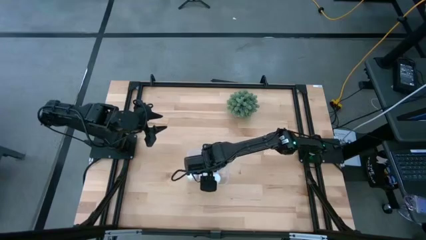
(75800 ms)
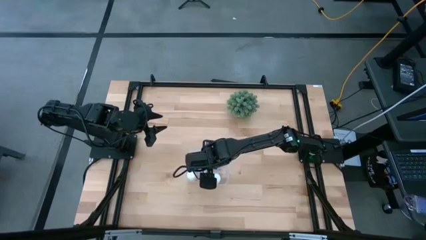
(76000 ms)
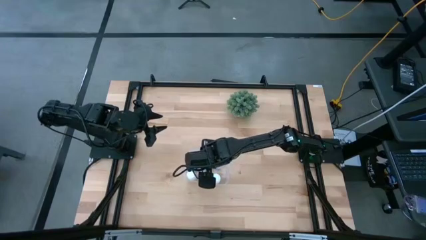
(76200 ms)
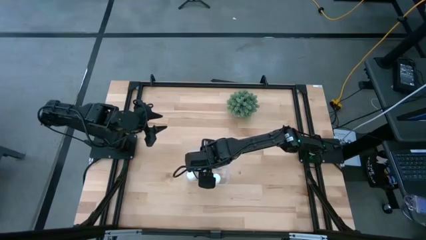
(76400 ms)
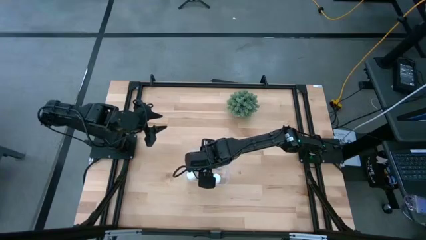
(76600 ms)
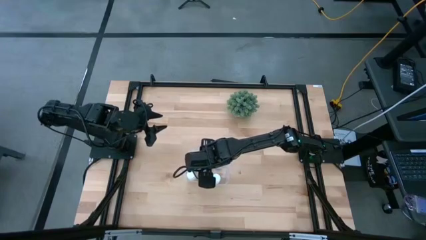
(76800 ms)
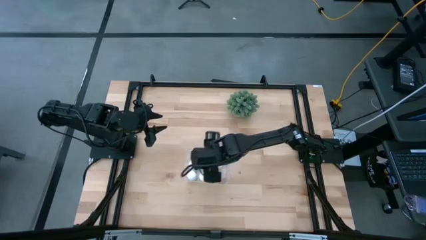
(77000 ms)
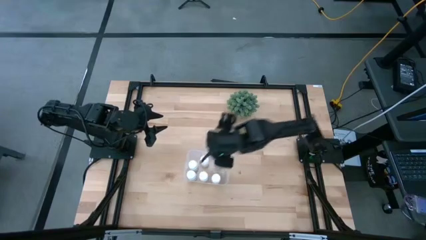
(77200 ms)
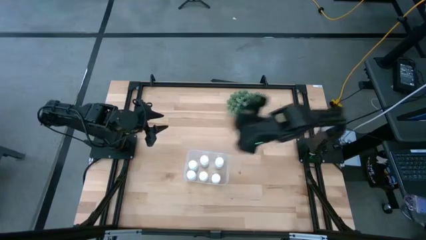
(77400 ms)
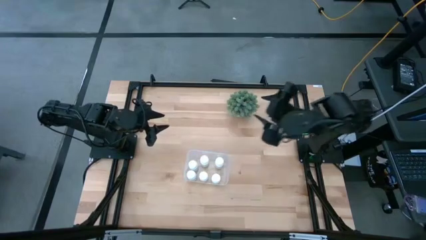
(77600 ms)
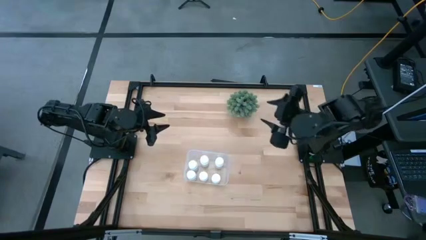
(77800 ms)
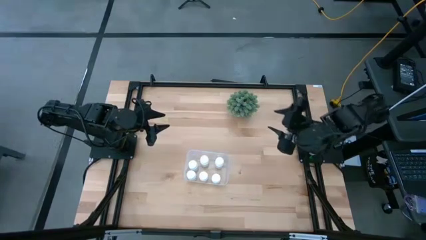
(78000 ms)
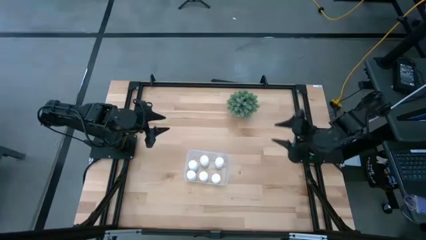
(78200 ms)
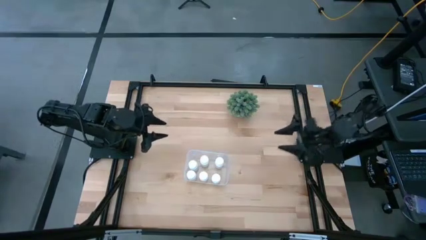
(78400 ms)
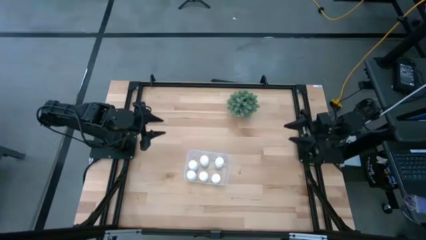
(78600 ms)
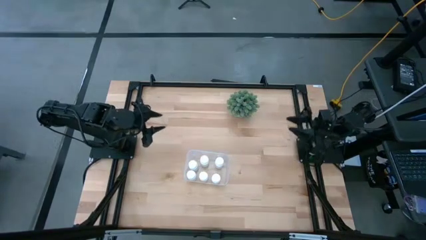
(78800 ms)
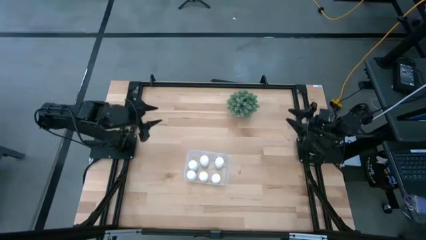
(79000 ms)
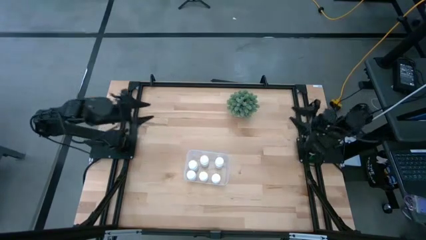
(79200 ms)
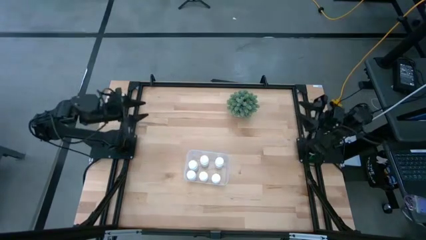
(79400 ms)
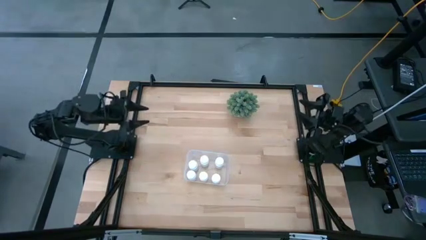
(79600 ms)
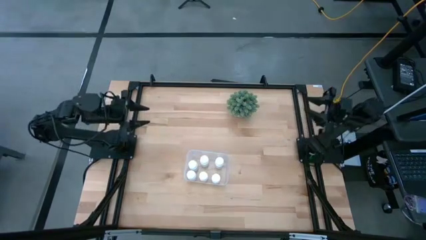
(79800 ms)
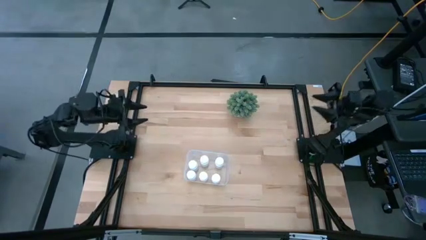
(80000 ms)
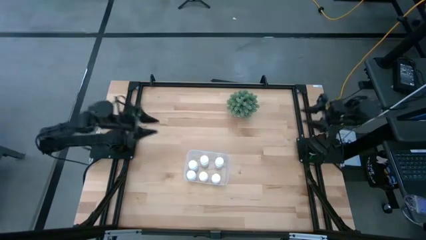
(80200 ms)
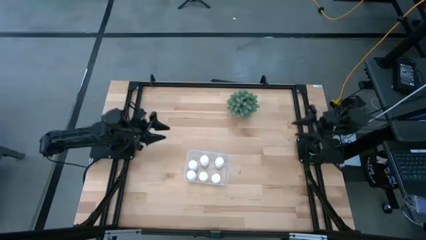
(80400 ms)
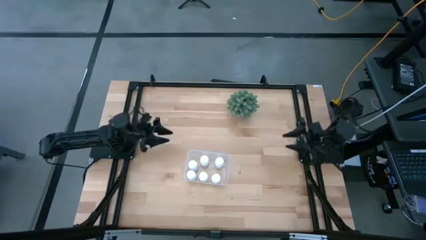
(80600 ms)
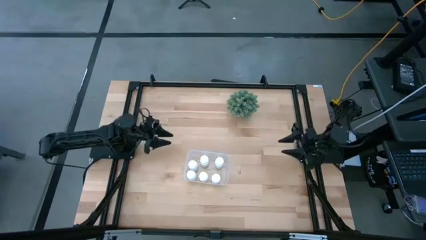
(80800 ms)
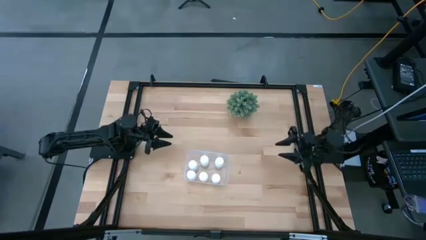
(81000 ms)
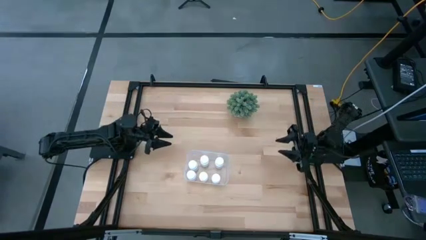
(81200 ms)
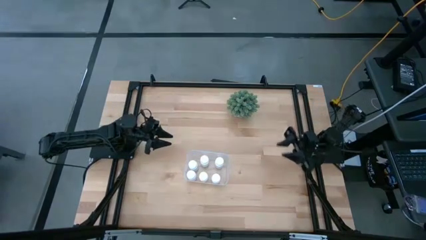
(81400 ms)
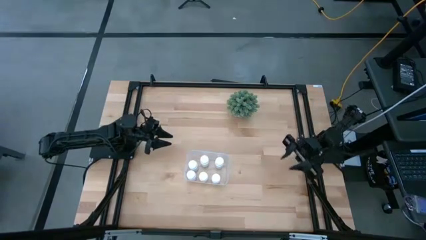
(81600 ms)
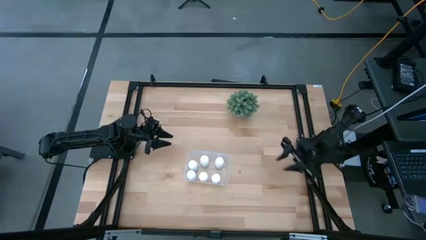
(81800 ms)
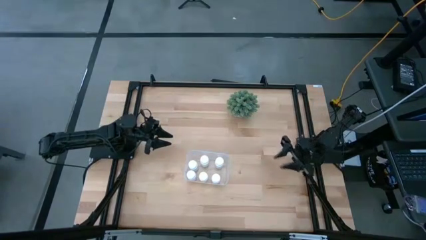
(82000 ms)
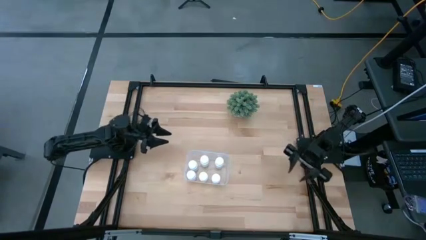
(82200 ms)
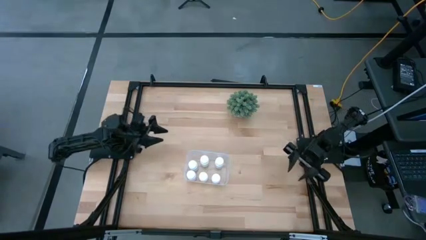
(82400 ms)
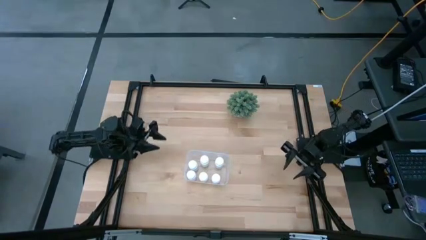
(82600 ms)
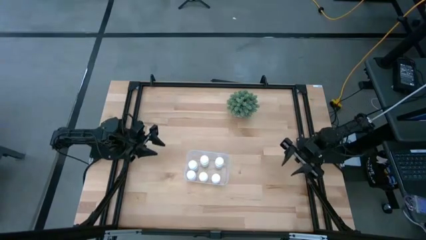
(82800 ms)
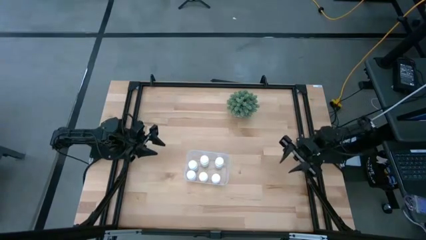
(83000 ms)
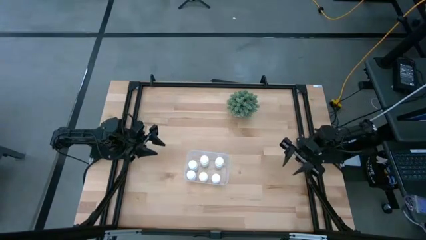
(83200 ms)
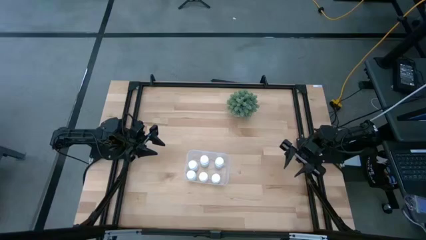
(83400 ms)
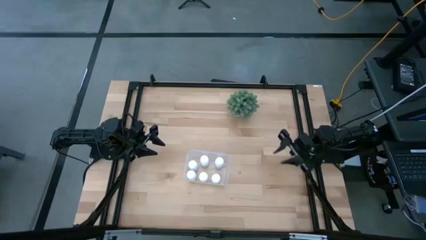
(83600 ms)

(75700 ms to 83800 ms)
Task: Pick and place pill bottles into a basket
Return to Home Position

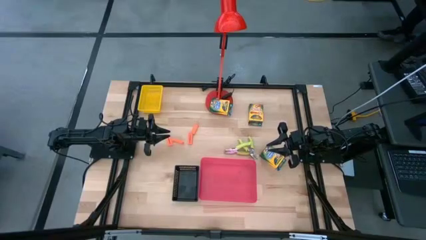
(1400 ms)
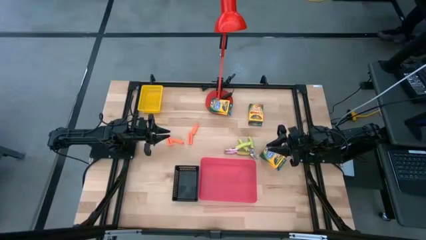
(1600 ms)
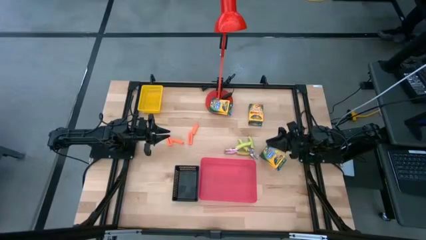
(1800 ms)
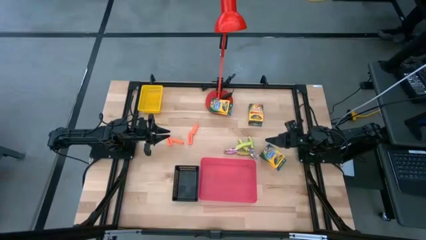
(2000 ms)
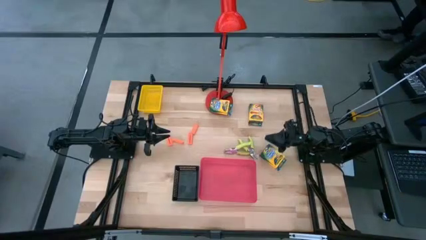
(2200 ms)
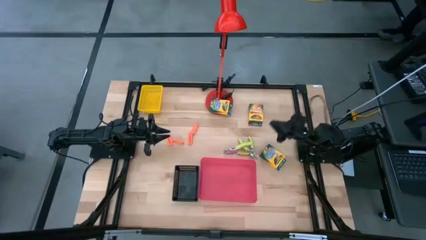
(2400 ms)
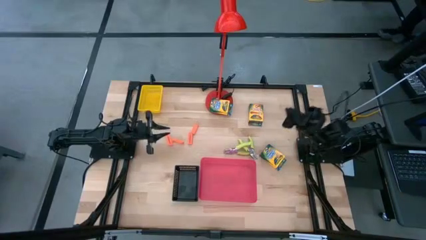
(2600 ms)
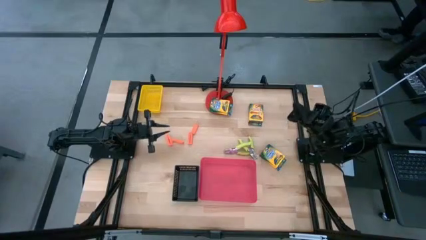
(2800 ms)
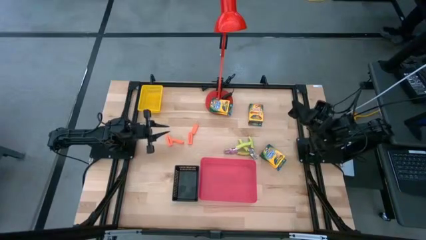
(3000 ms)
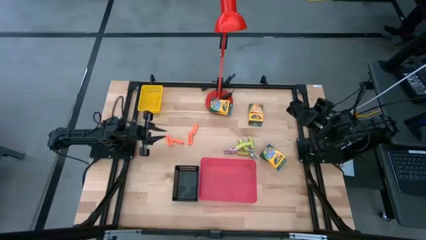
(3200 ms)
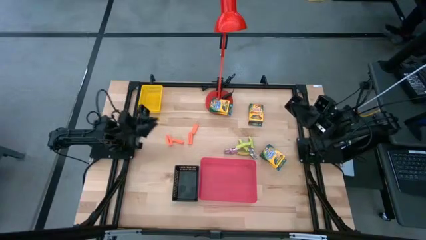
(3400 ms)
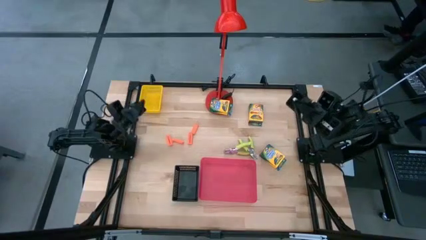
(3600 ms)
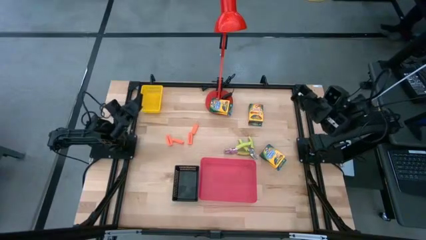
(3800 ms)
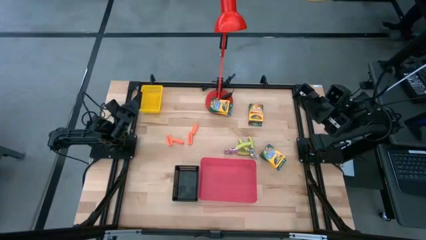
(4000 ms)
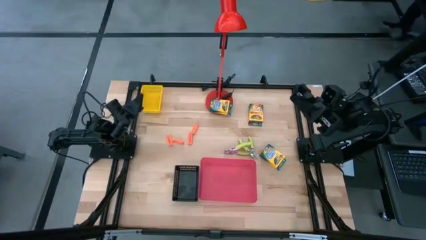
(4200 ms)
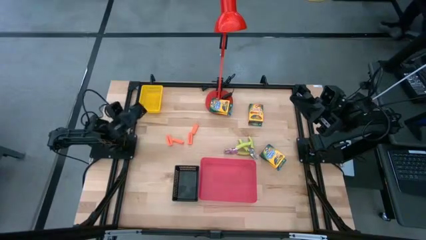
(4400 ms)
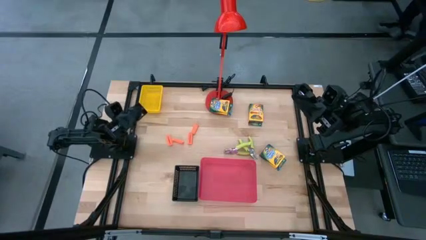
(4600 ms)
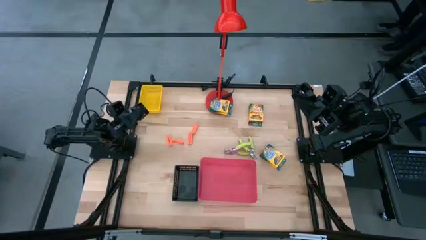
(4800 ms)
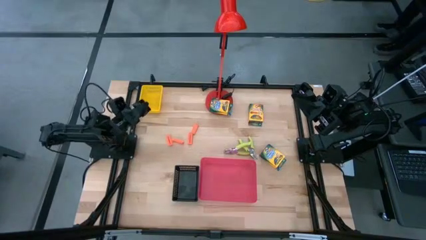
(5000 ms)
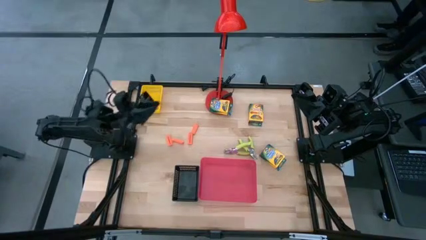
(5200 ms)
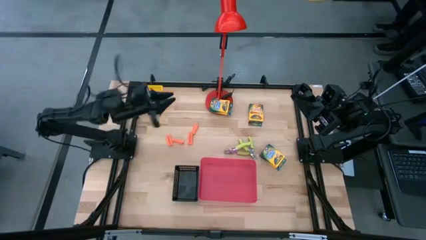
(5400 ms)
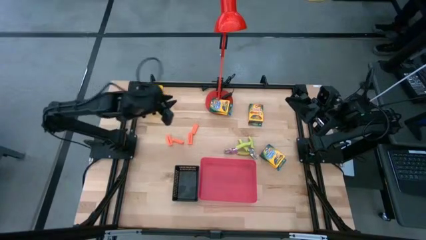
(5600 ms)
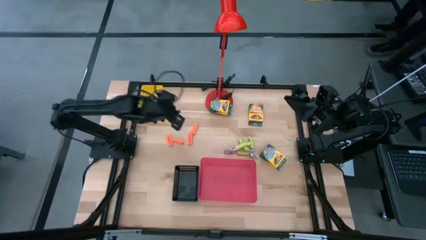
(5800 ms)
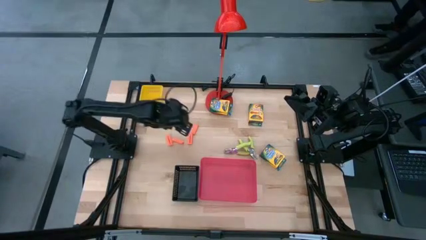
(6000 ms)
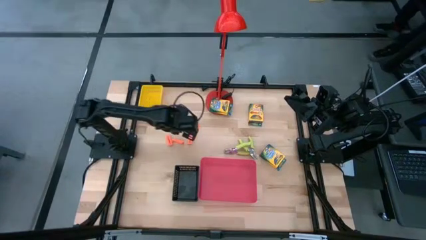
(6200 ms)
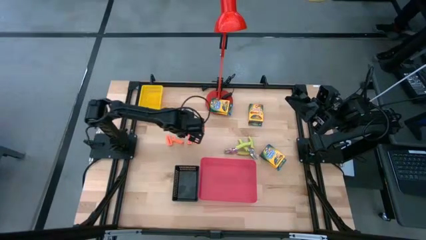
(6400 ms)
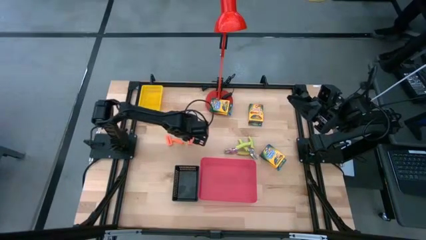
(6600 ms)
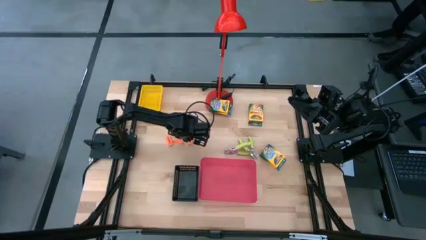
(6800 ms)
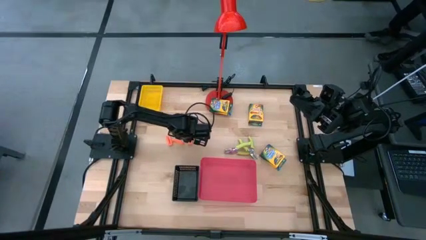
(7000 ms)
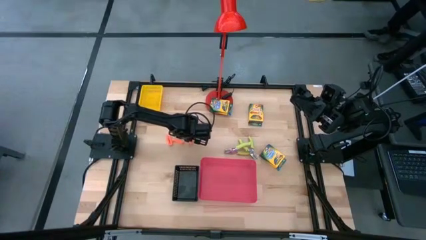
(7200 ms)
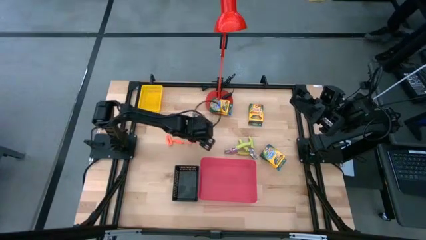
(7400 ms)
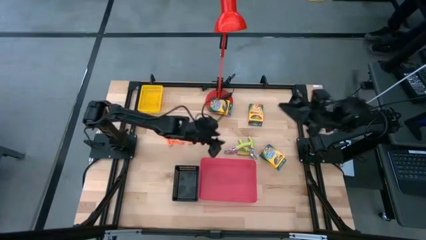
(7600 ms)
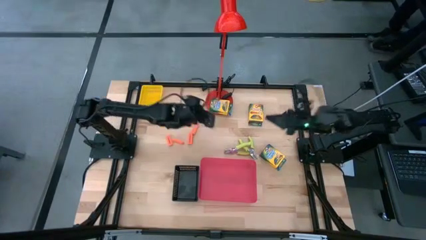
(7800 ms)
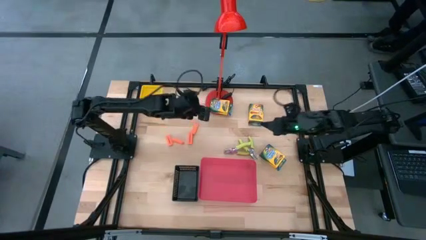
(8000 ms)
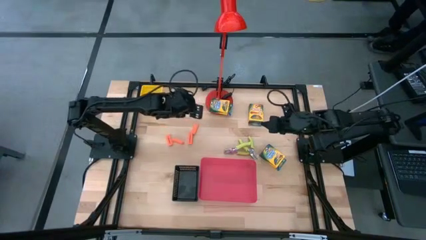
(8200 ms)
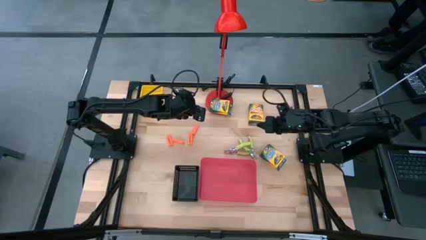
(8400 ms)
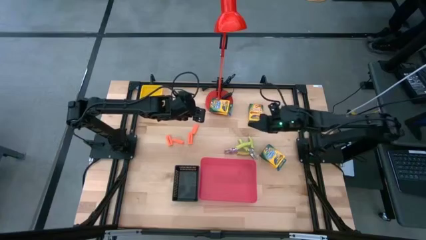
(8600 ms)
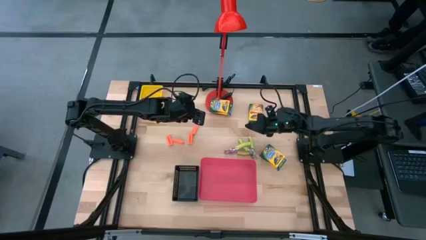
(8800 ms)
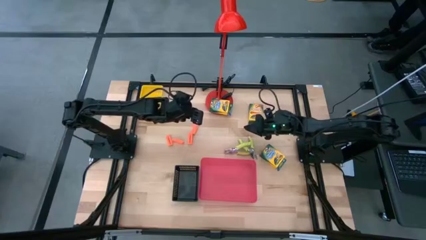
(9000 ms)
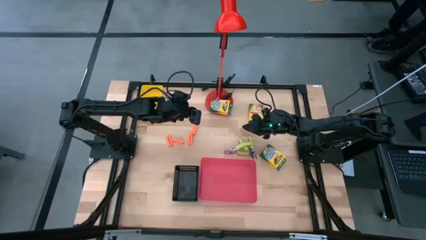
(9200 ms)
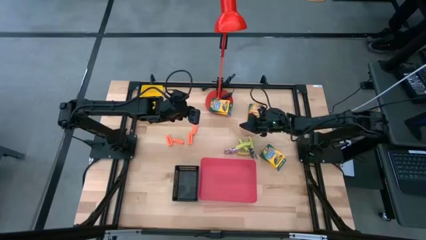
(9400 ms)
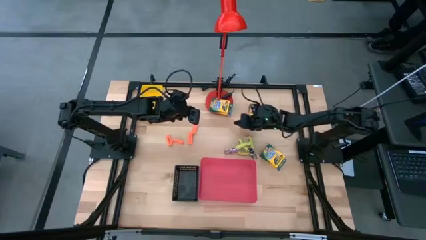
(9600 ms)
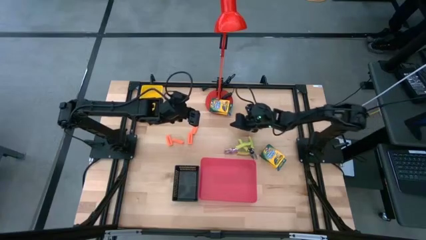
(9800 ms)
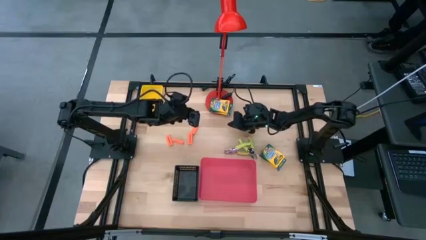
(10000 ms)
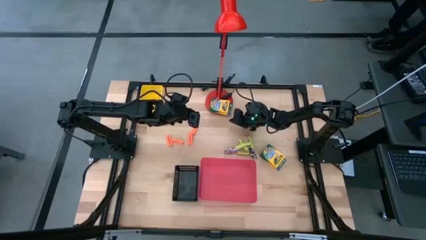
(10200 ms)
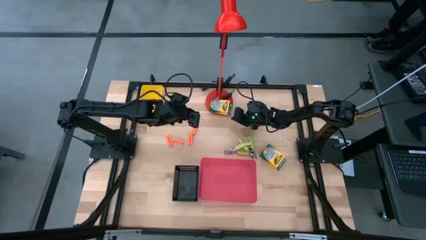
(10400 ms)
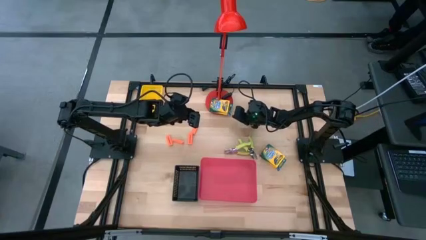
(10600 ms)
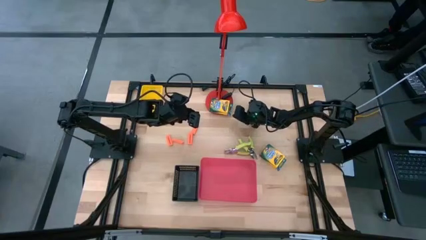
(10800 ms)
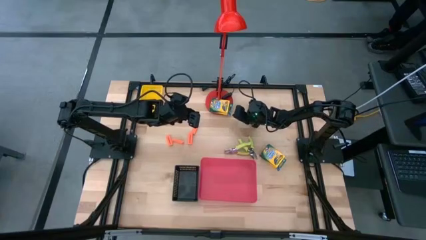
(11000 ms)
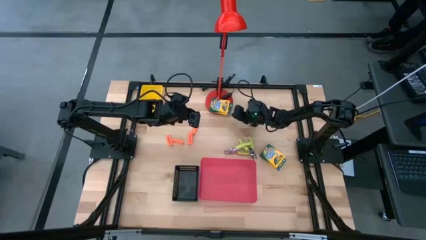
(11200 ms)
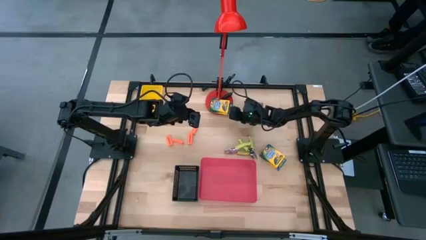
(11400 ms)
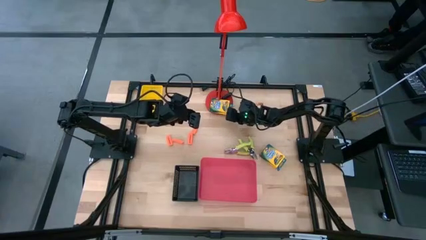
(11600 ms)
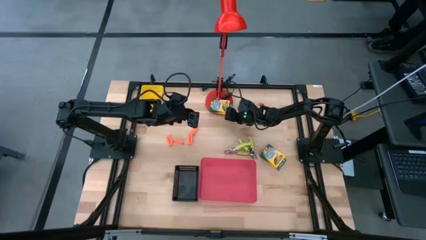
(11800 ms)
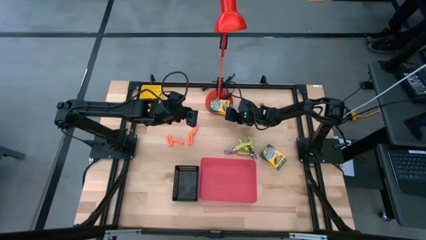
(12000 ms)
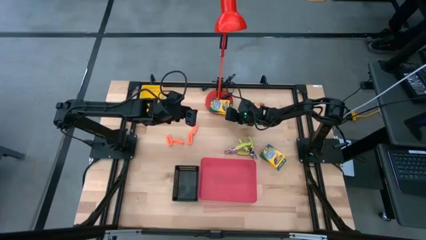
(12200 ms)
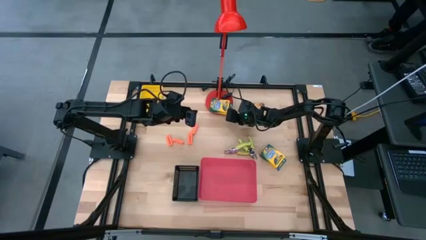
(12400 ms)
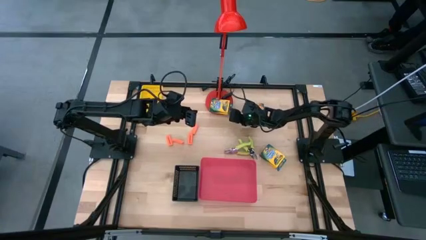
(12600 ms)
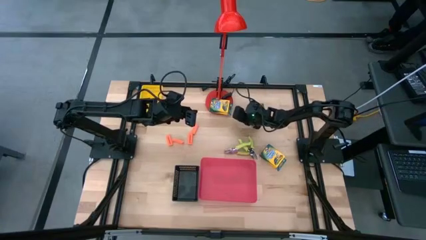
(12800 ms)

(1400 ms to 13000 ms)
Task: Pick & Place School Supplies
Put the middle yellow crayon box into the red bin
